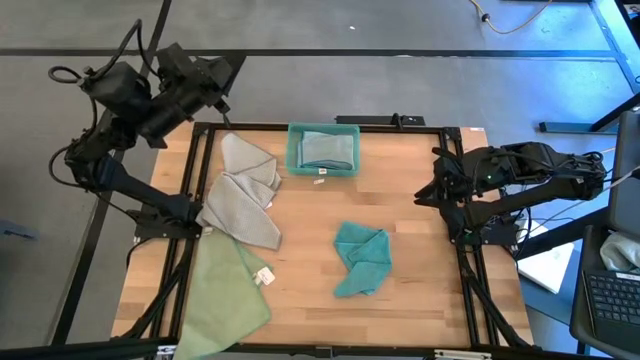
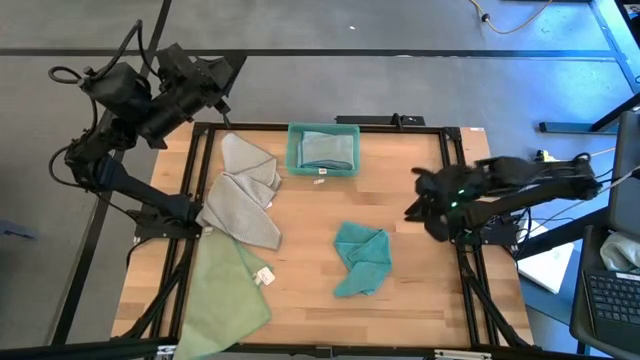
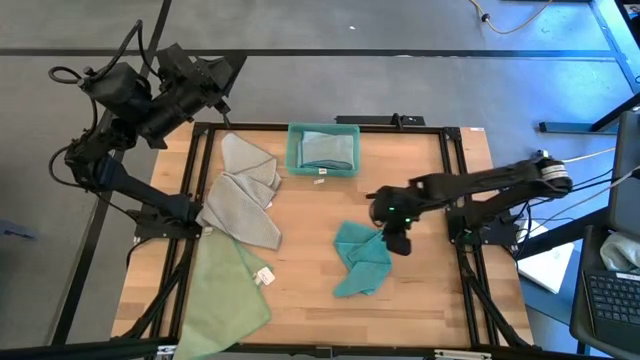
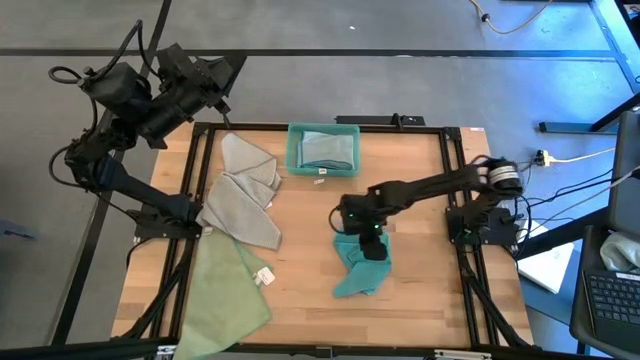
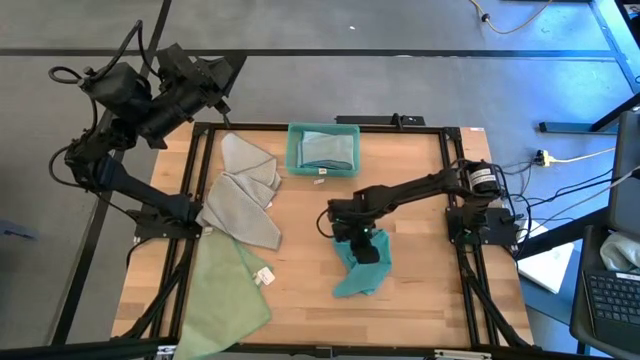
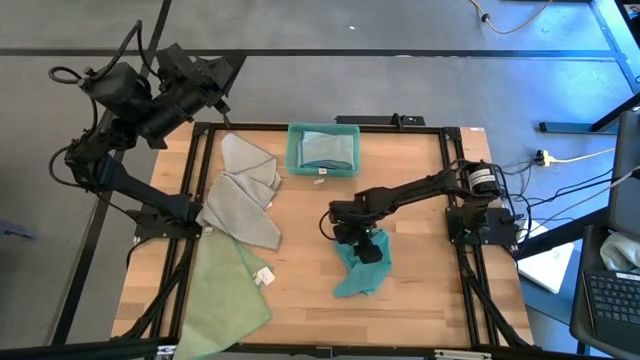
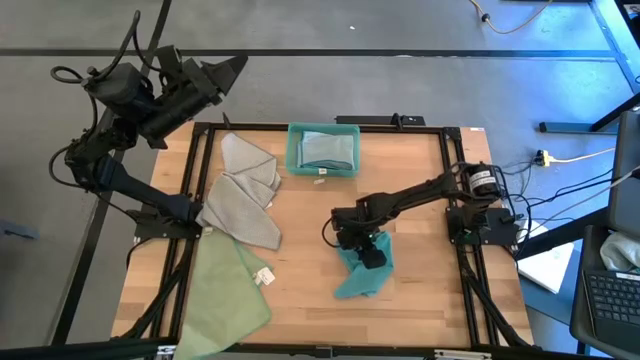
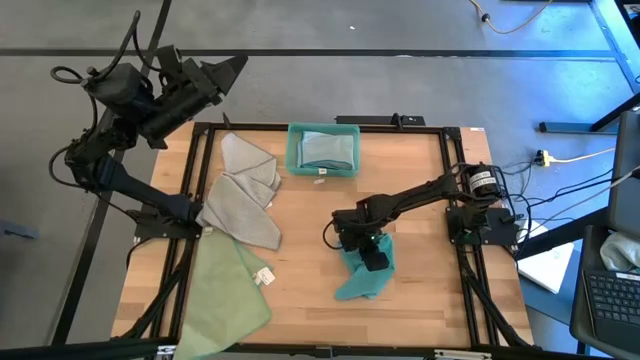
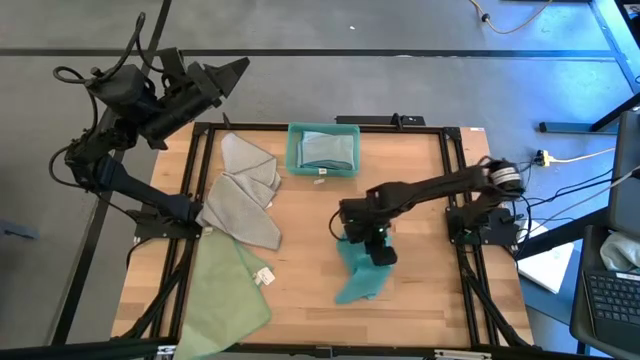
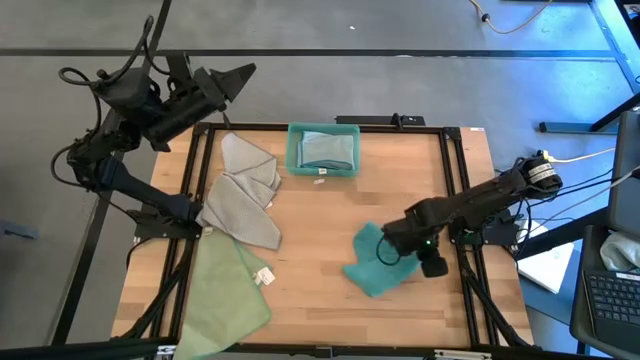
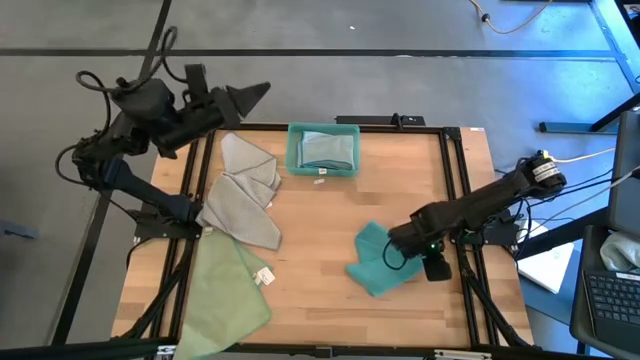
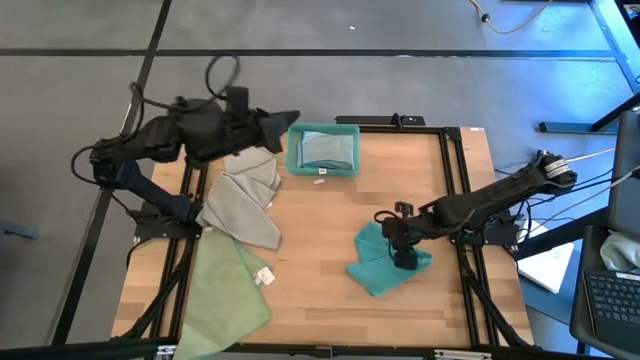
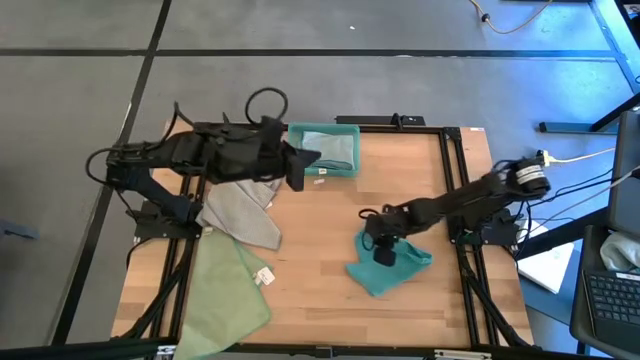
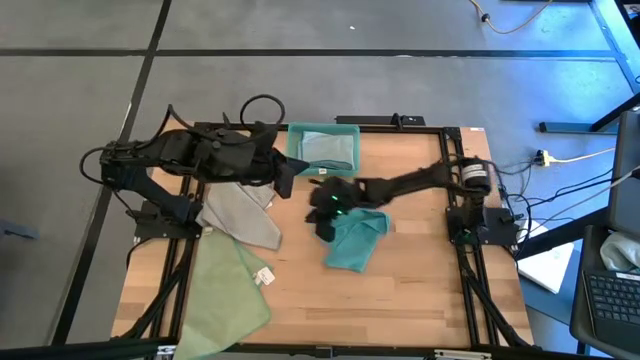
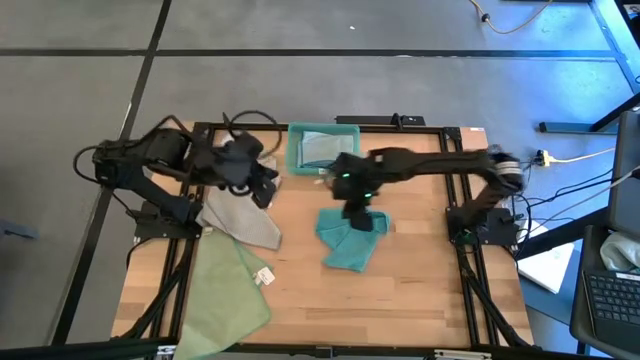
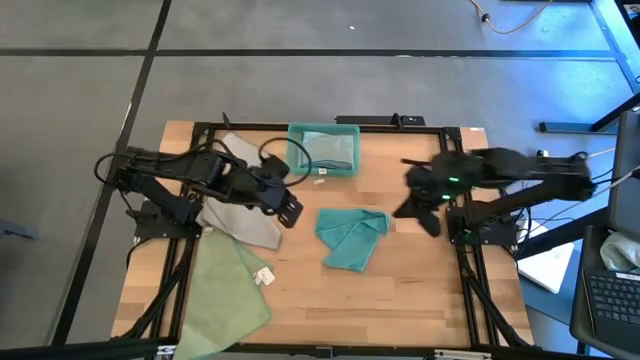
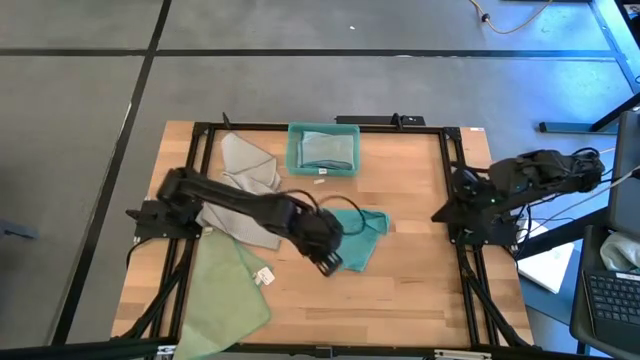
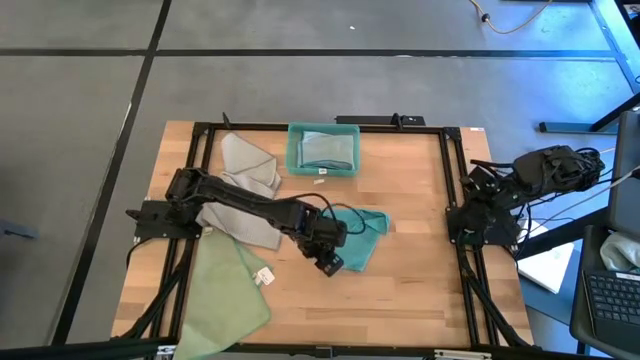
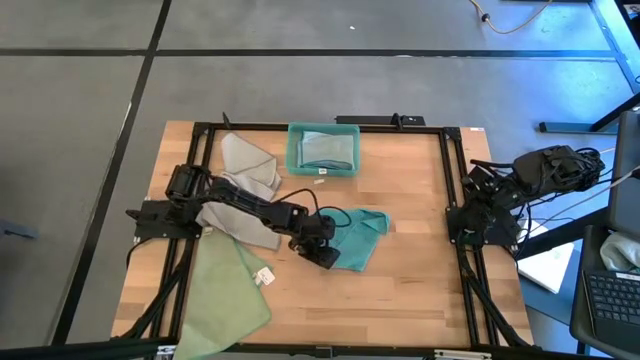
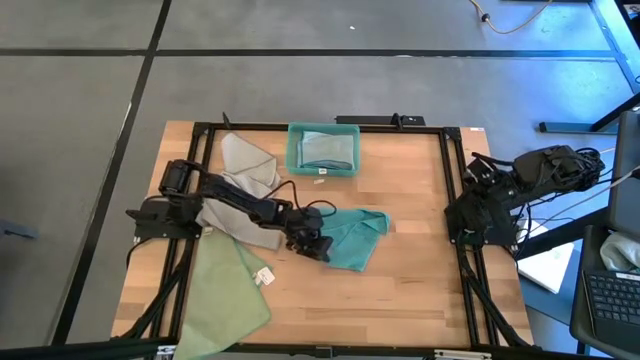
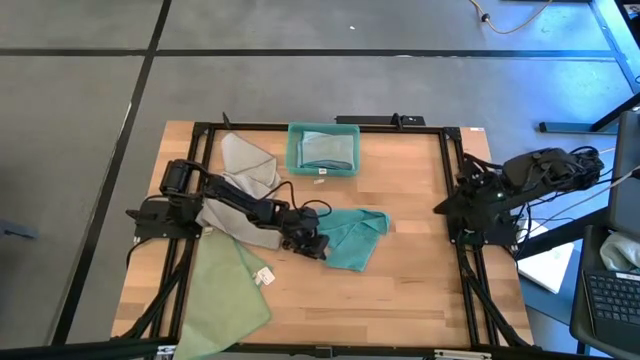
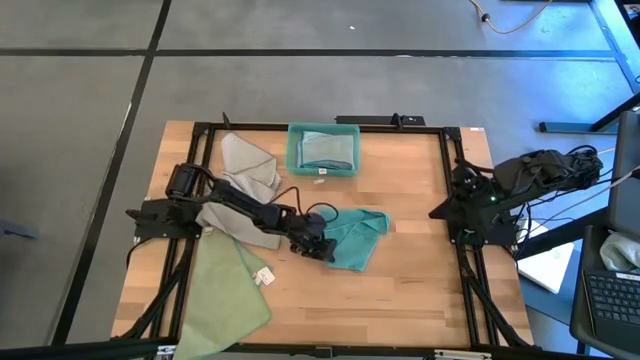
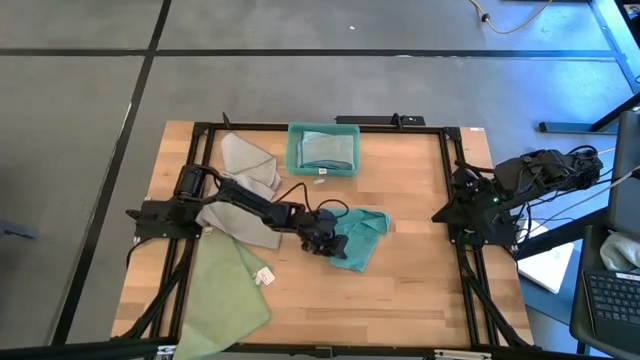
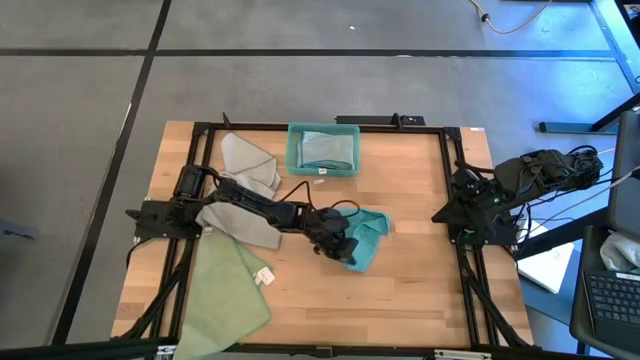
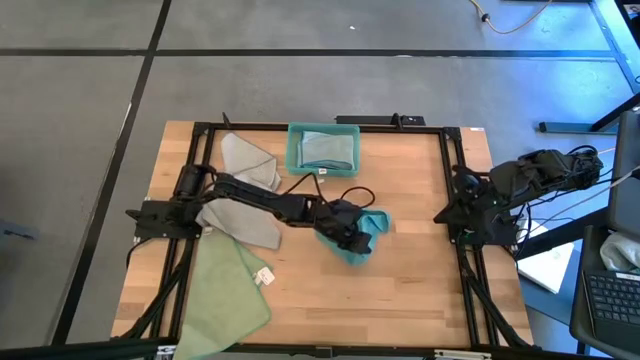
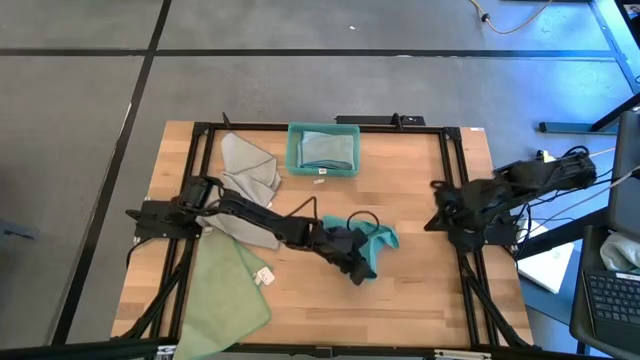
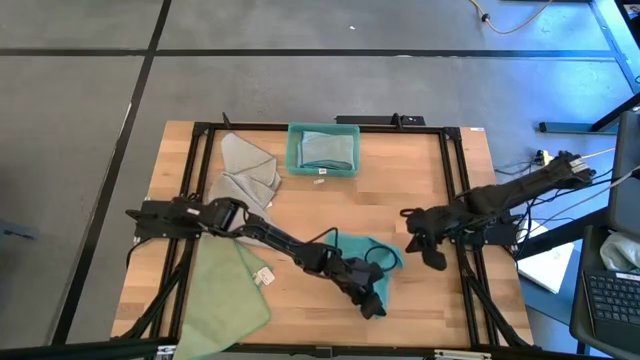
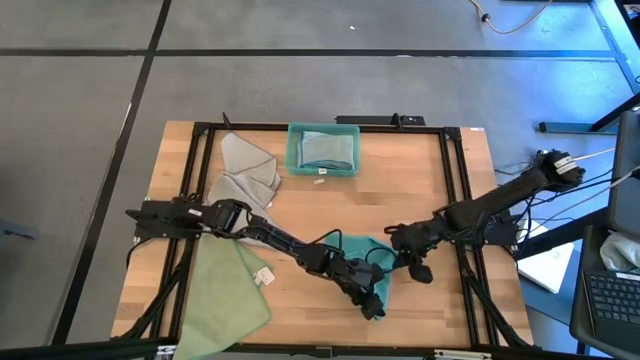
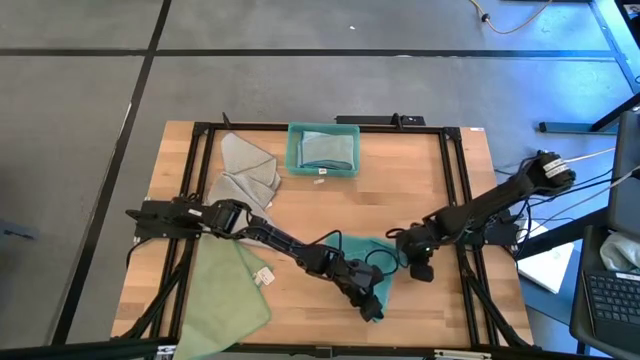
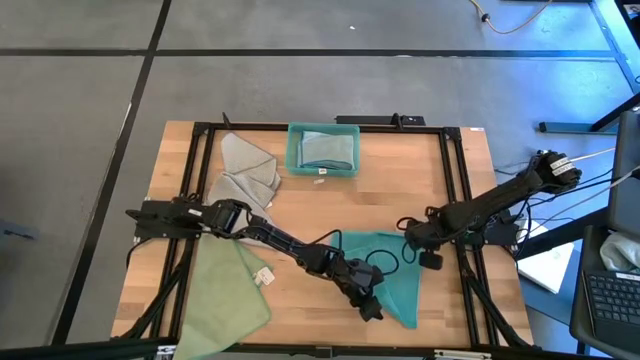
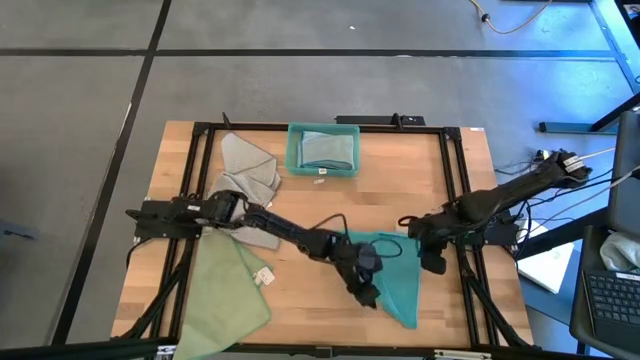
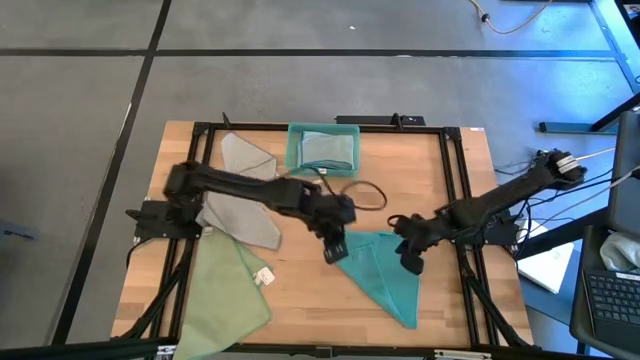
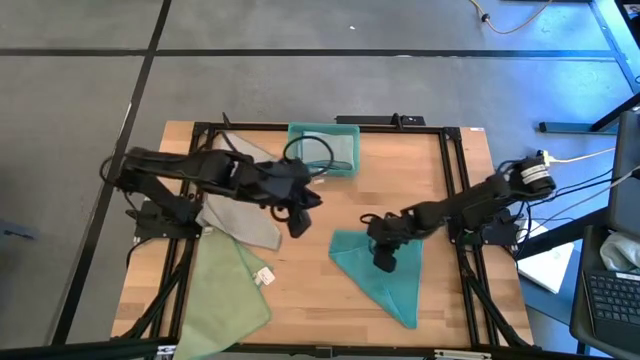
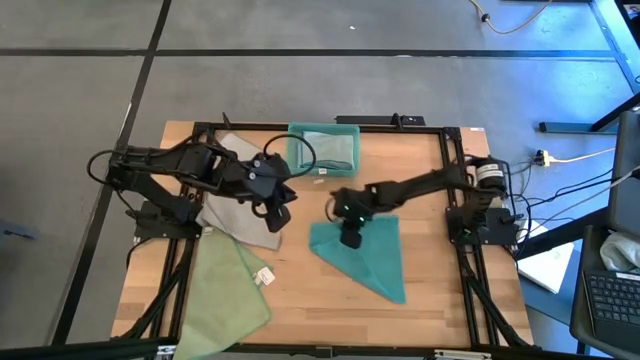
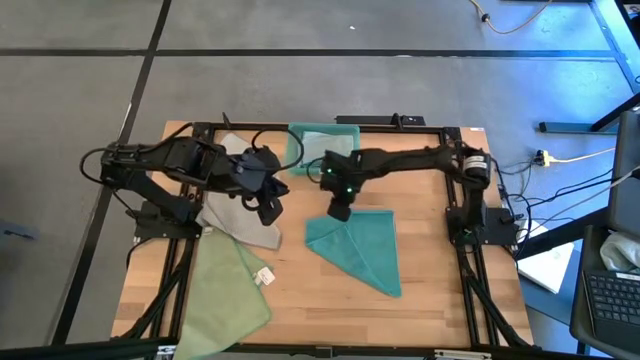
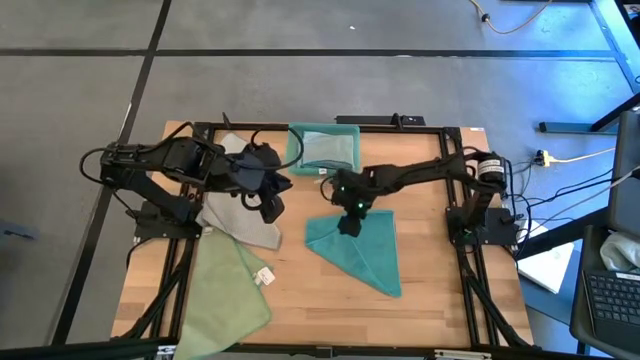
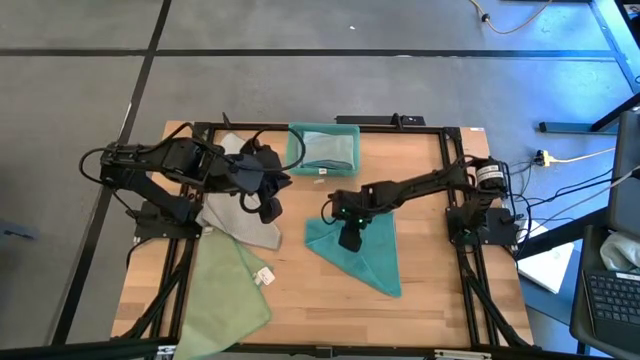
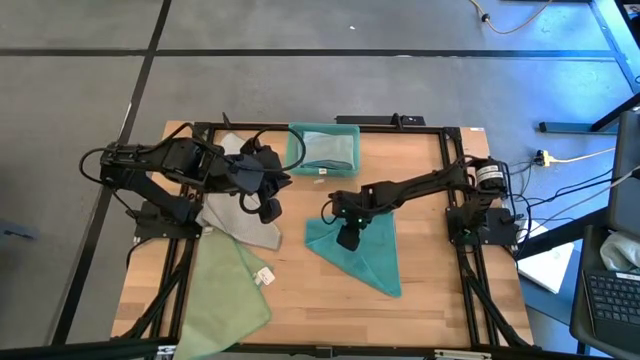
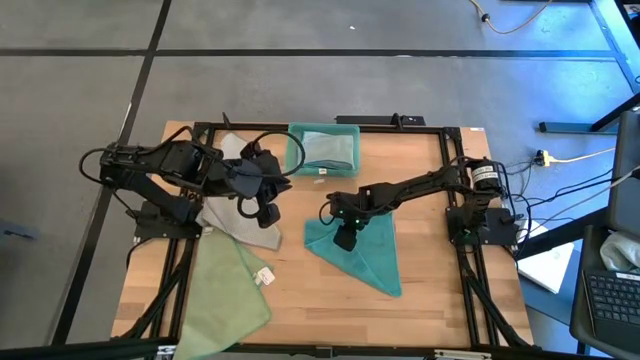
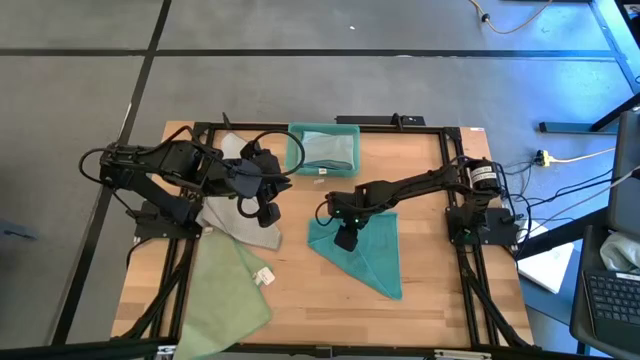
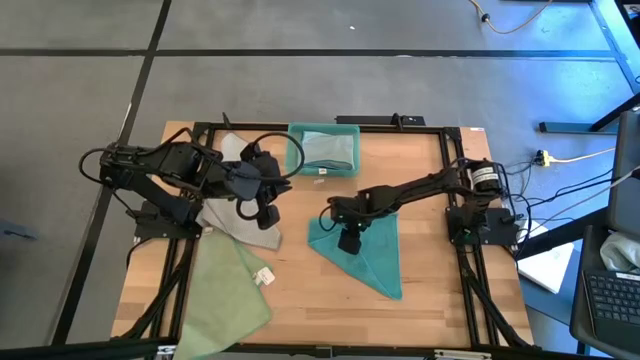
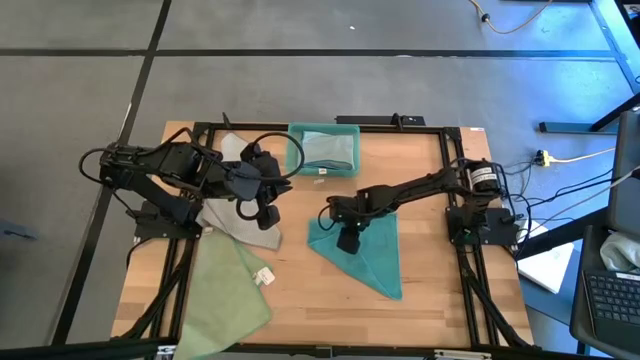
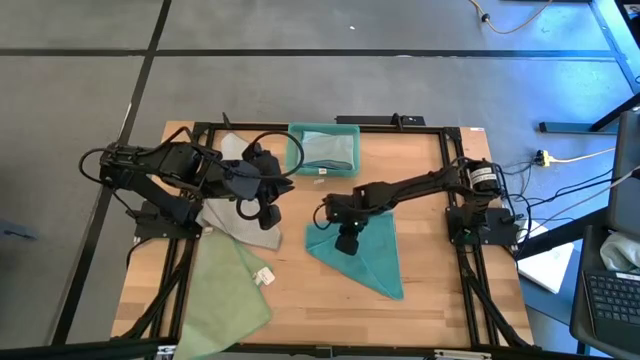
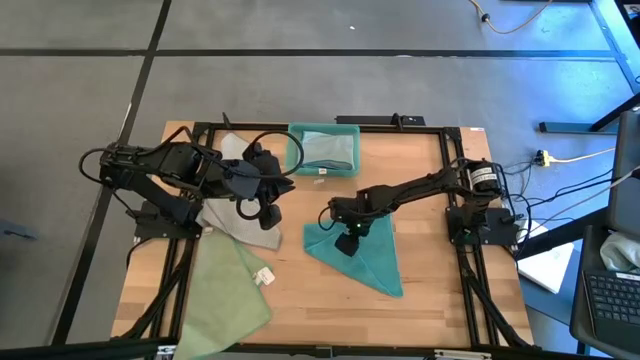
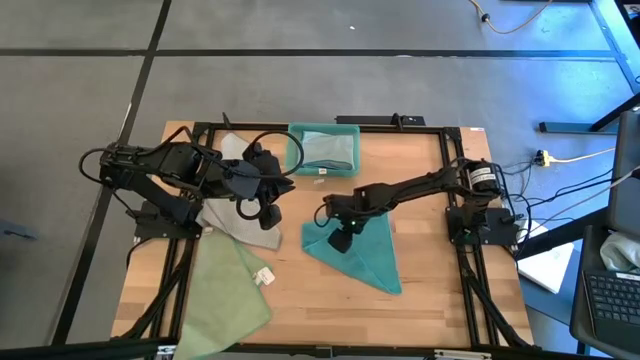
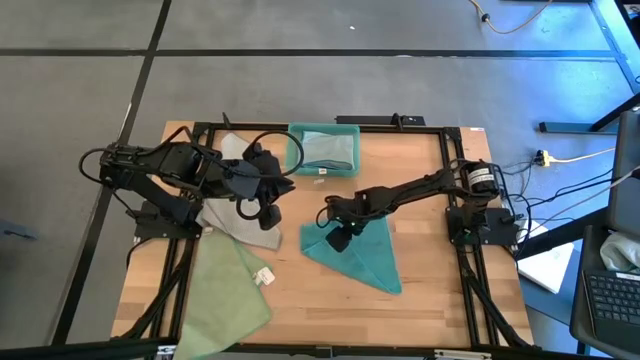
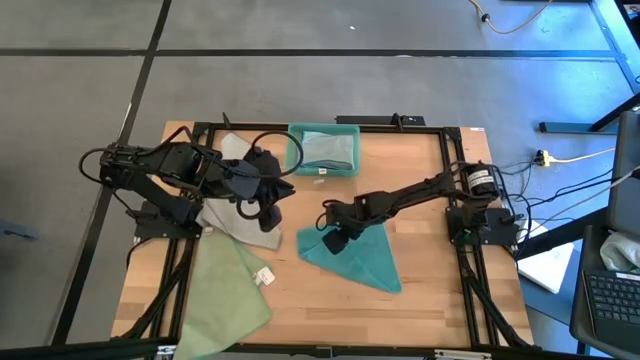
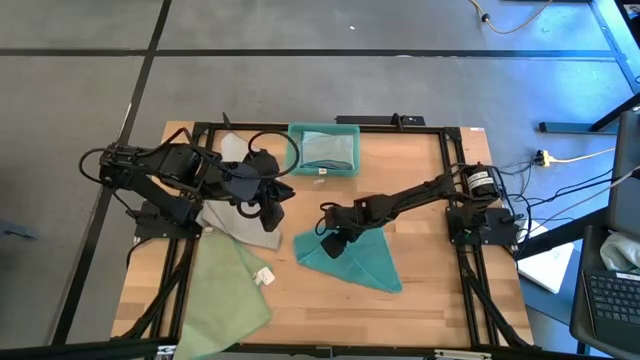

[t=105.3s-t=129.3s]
Task: Fold microfiber towels
Prepare the blue towel
